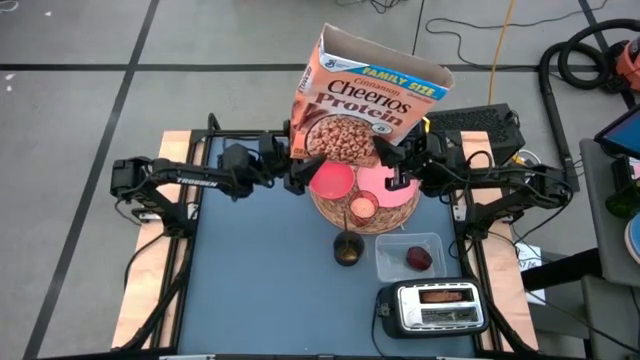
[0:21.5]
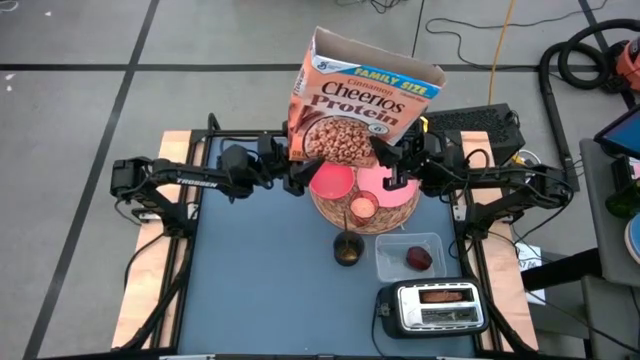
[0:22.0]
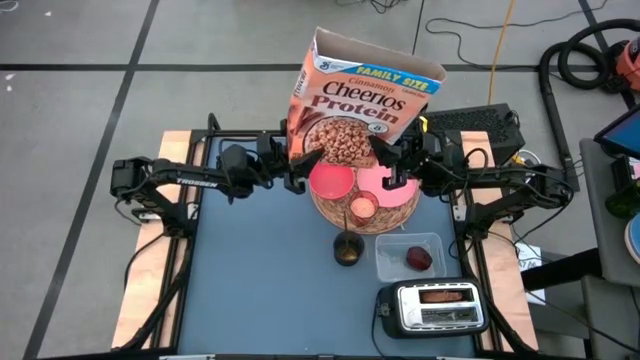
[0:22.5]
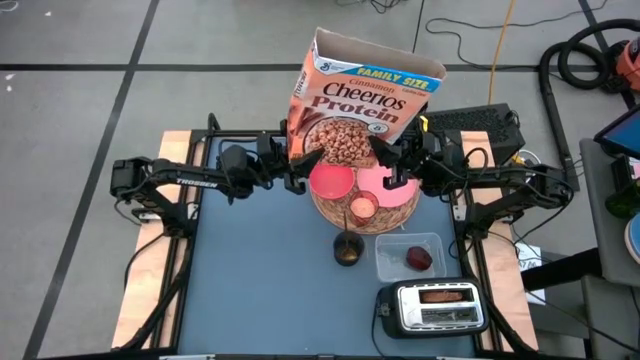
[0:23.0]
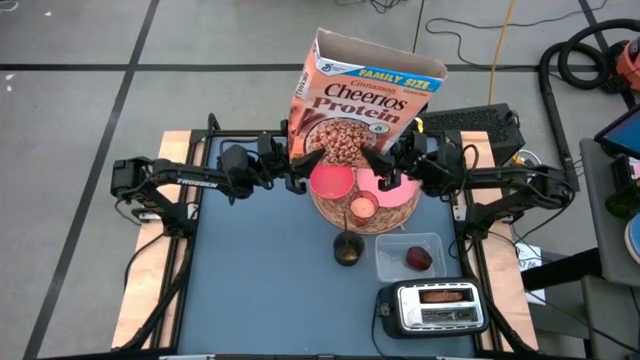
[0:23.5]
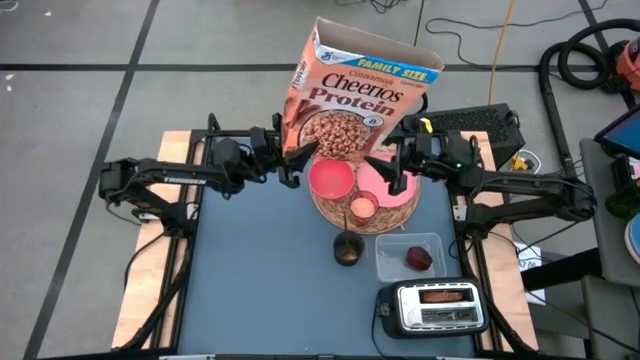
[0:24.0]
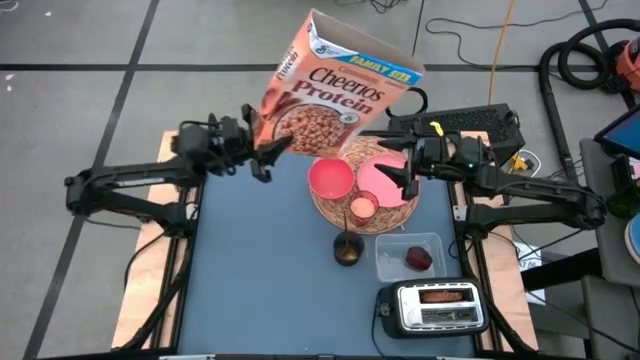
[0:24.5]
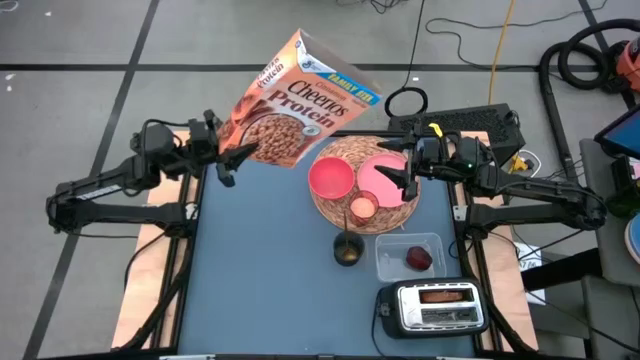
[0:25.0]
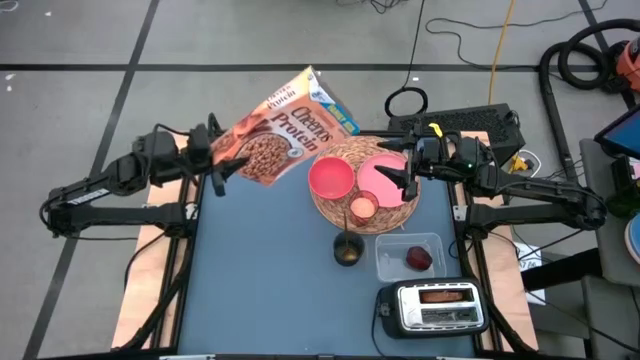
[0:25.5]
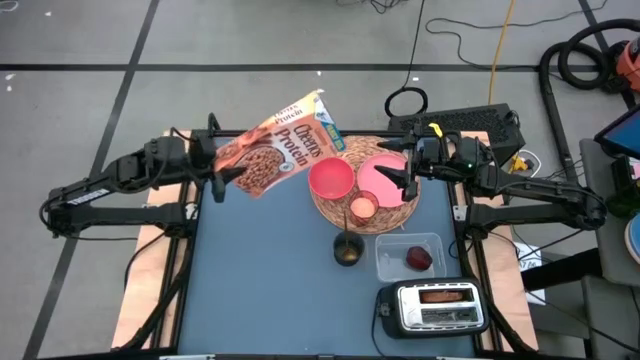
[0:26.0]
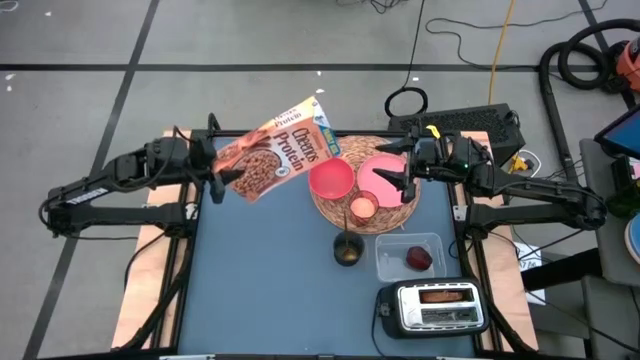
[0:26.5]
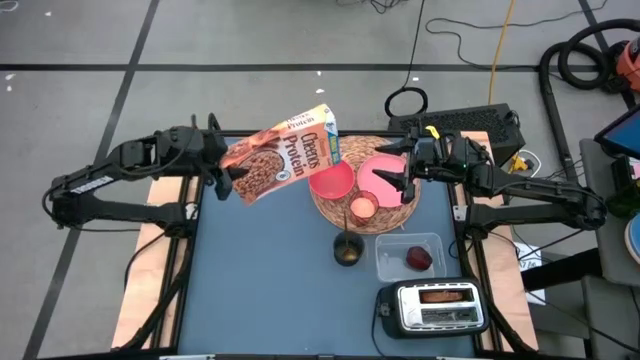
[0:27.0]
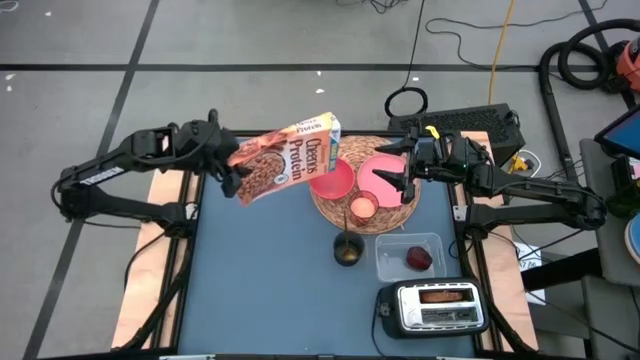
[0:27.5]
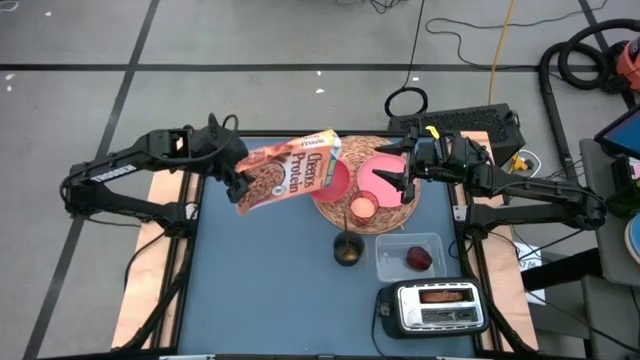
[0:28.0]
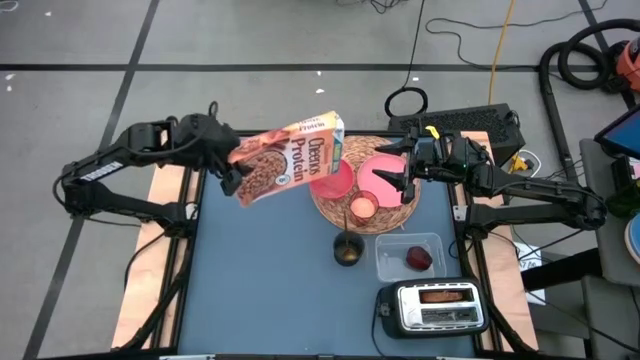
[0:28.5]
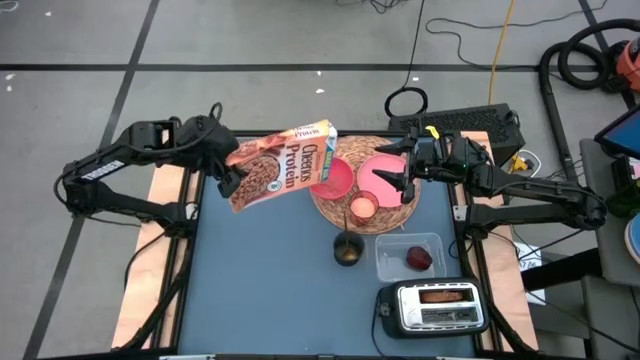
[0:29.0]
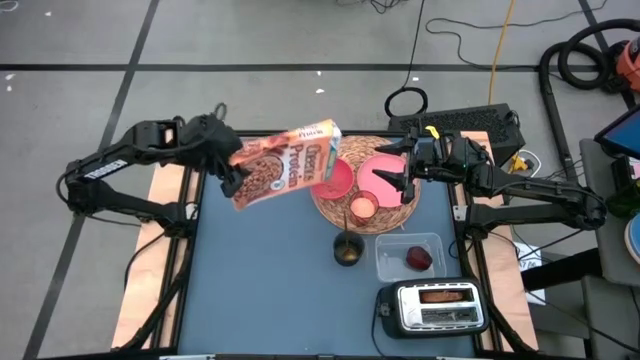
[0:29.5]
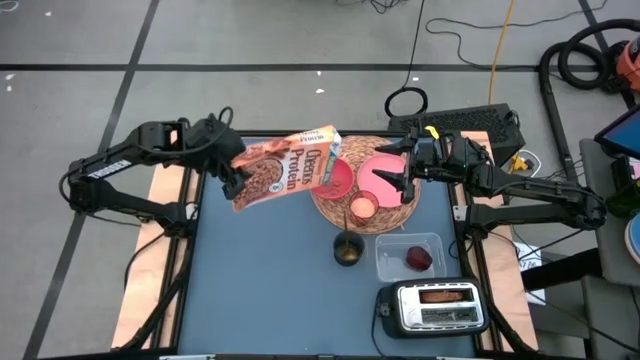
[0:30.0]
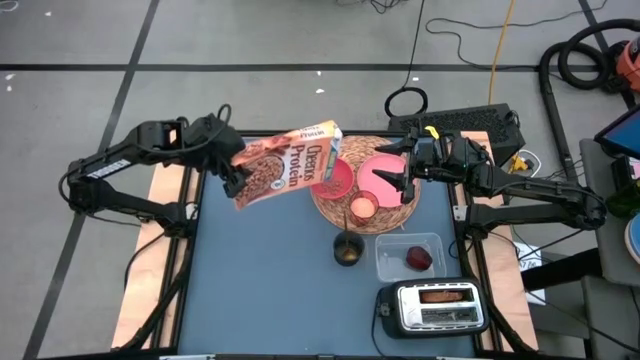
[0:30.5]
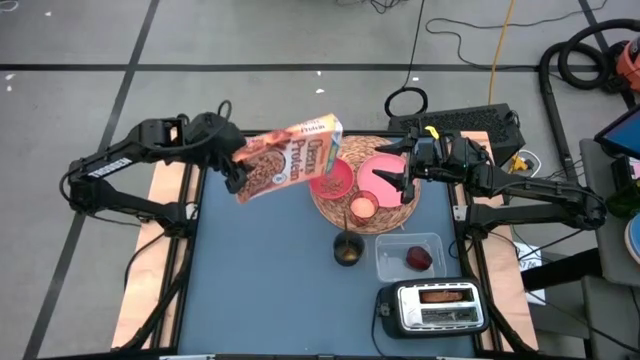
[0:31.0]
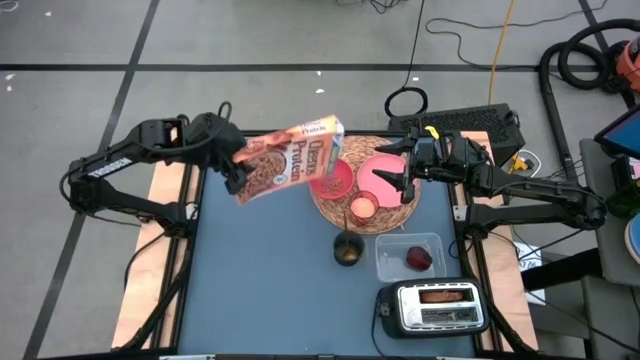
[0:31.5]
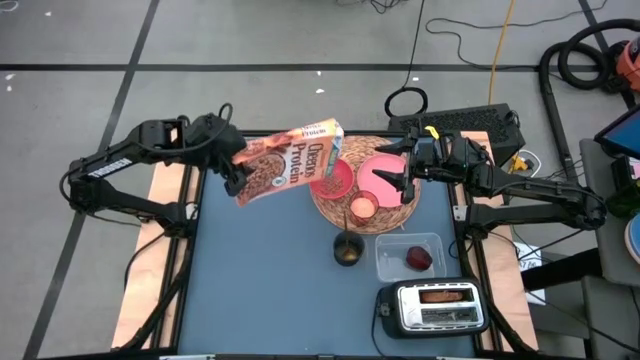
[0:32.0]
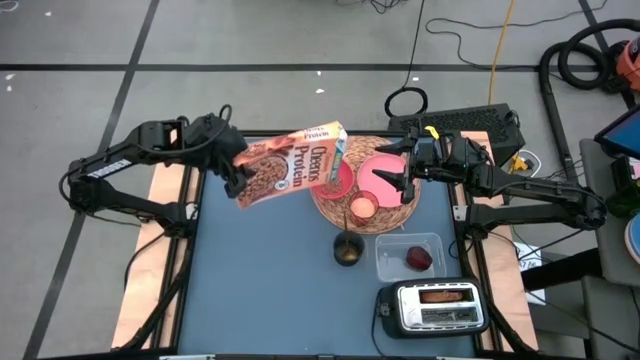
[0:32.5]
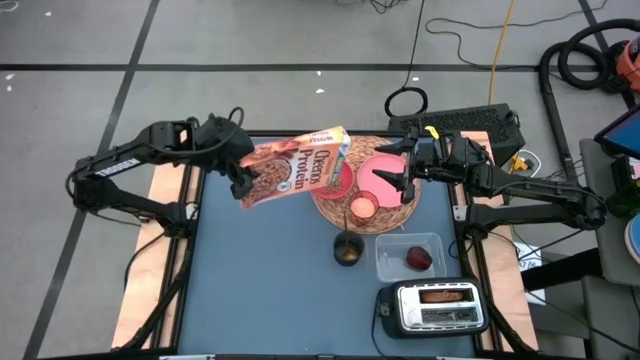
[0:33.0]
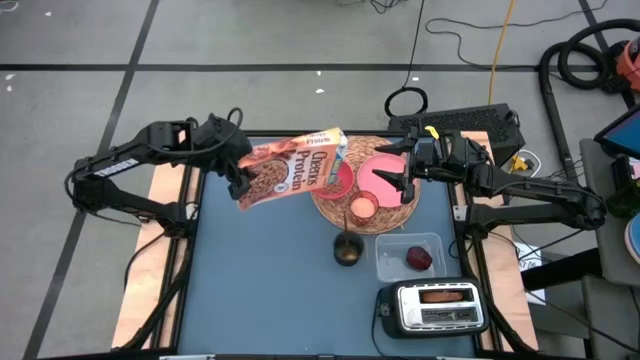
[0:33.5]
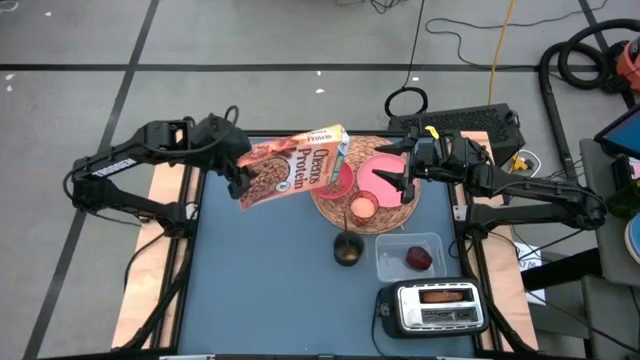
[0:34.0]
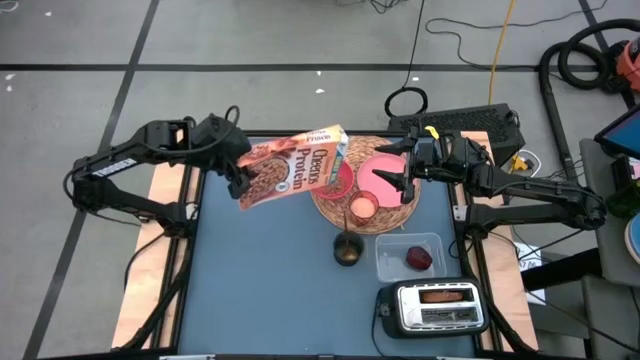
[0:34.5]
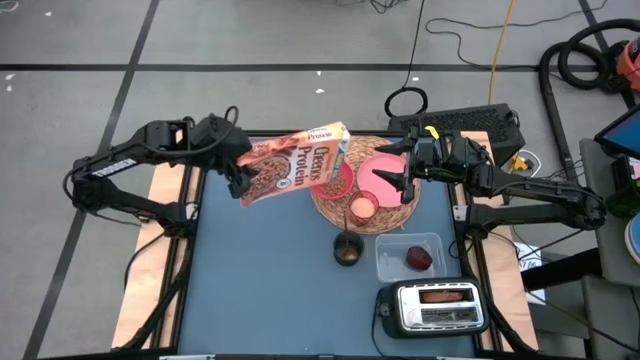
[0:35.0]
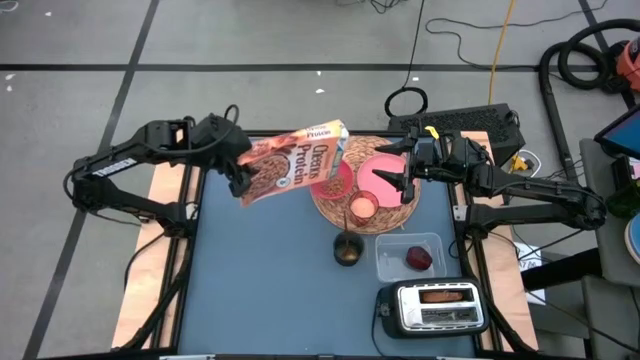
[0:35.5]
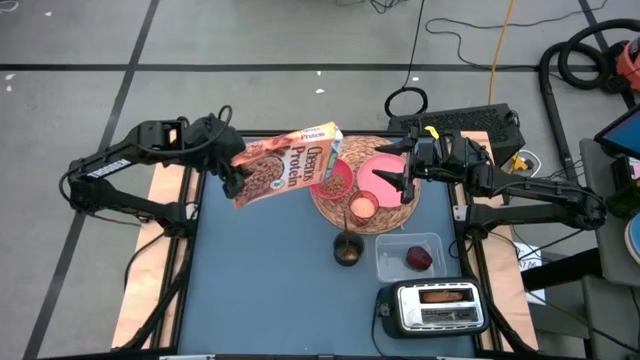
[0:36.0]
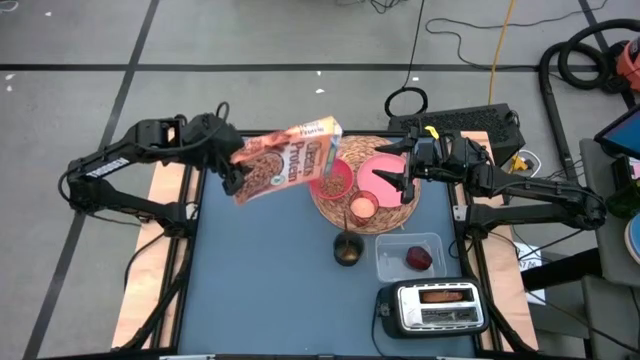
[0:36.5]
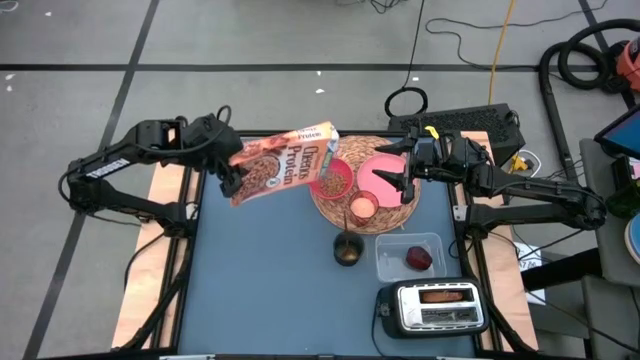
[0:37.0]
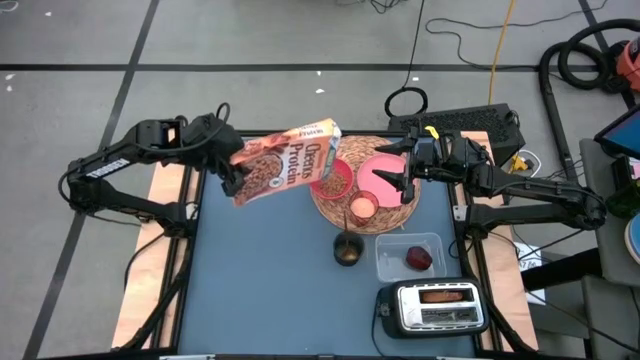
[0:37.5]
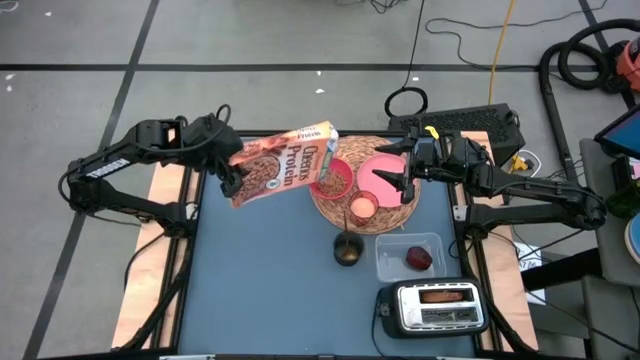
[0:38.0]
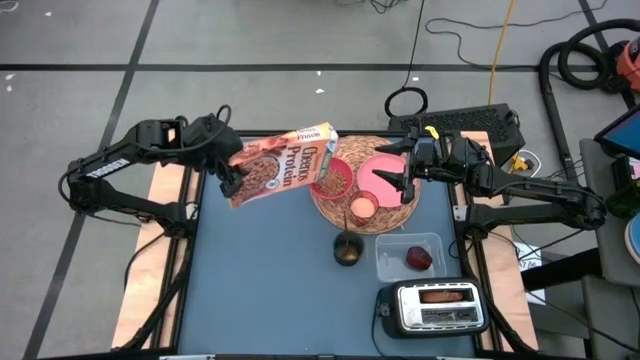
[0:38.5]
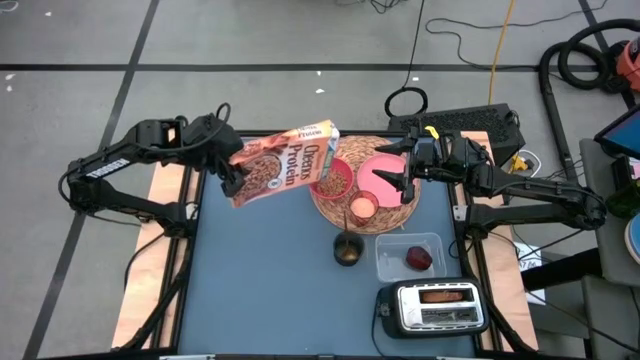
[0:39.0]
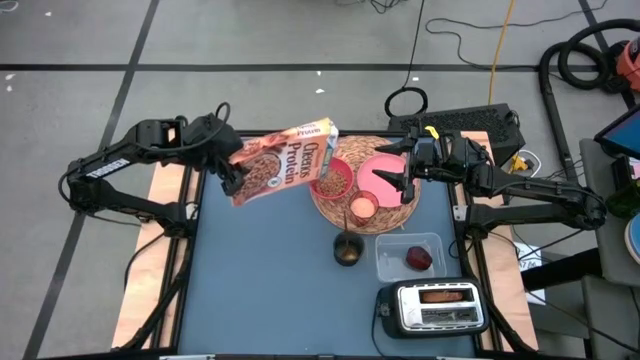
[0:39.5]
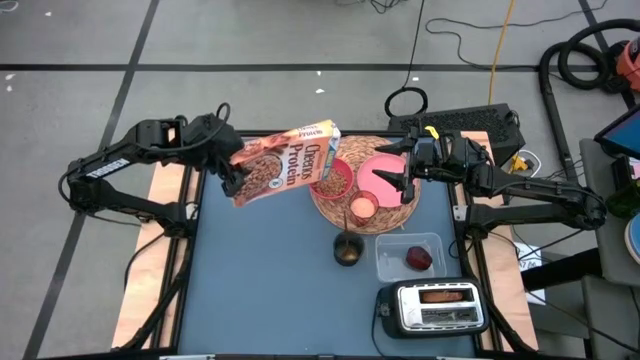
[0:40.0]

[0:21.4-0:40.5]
Task: Arrange a breakfast setting
Pour the cereal from the cereal box into the red bowl
